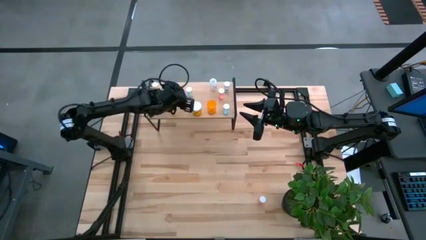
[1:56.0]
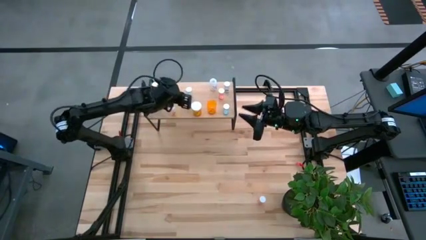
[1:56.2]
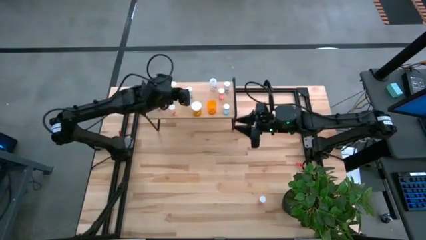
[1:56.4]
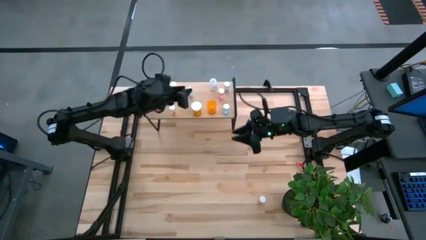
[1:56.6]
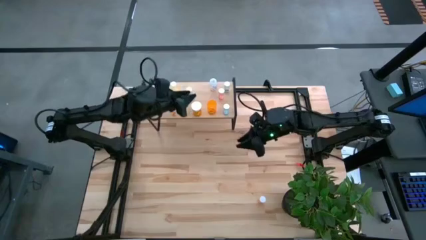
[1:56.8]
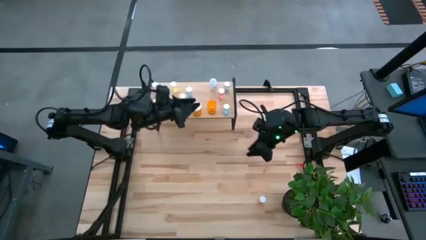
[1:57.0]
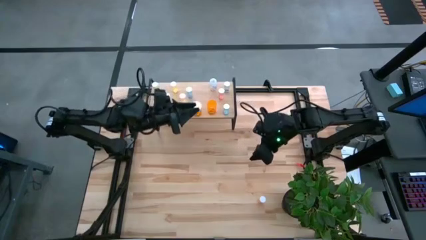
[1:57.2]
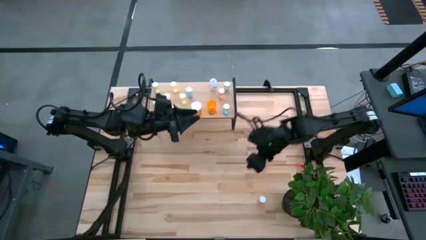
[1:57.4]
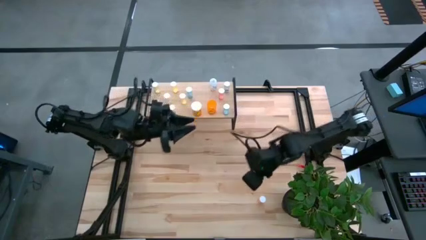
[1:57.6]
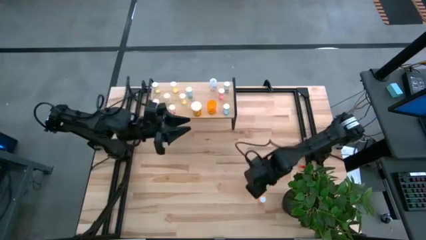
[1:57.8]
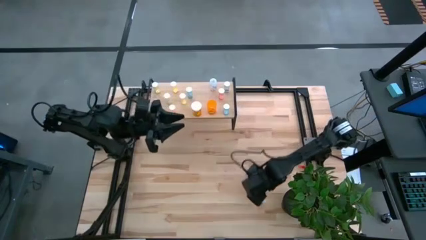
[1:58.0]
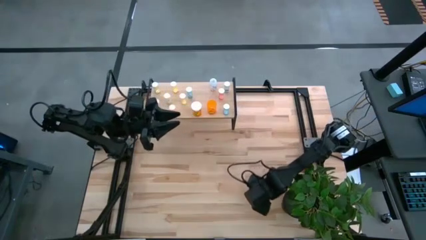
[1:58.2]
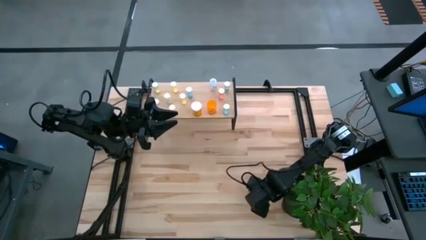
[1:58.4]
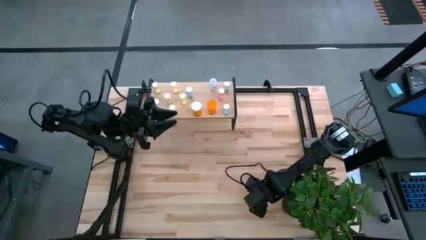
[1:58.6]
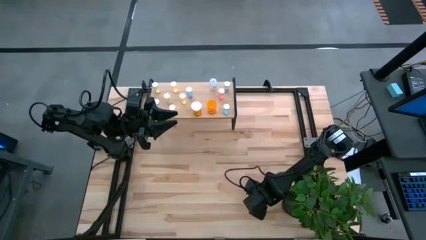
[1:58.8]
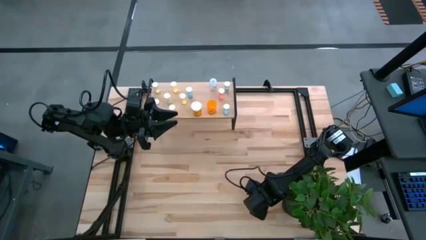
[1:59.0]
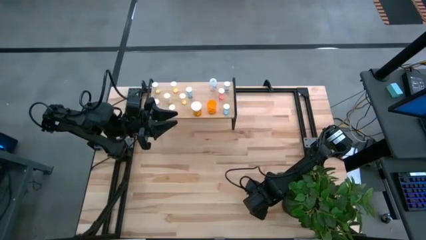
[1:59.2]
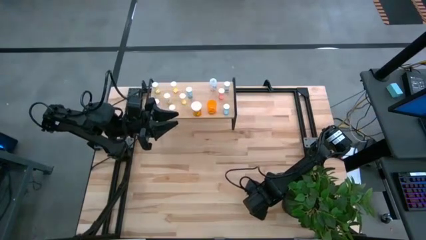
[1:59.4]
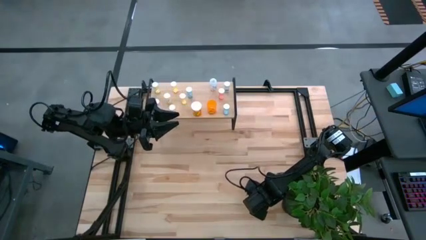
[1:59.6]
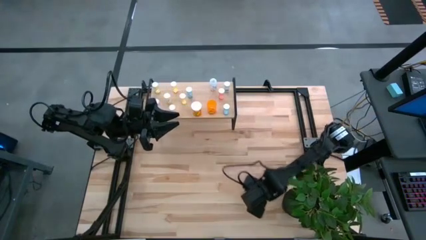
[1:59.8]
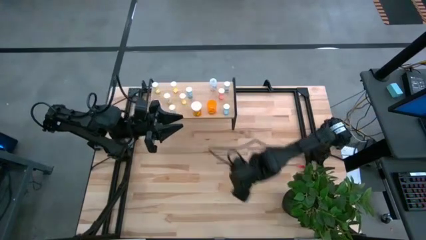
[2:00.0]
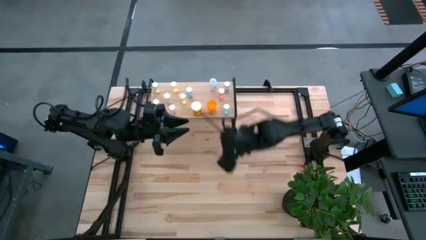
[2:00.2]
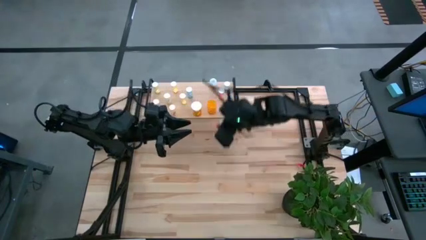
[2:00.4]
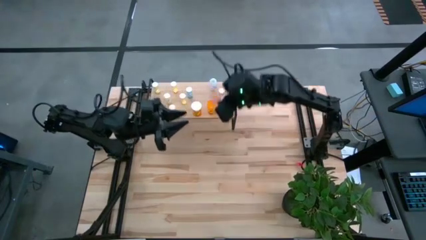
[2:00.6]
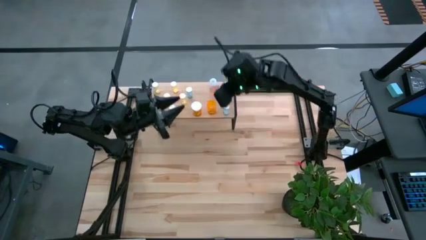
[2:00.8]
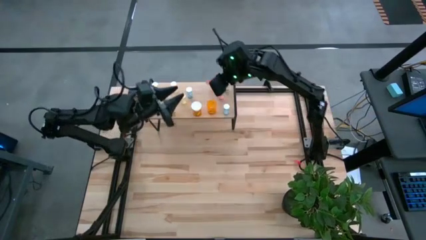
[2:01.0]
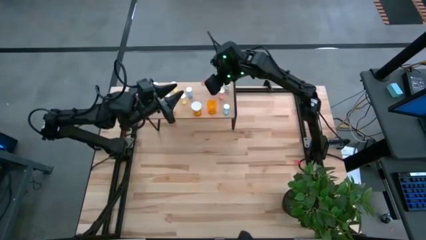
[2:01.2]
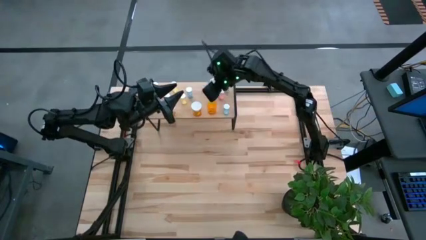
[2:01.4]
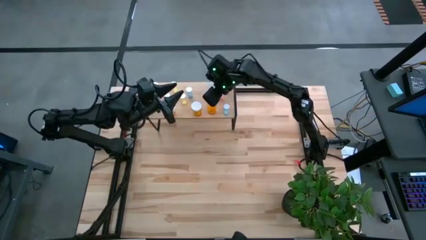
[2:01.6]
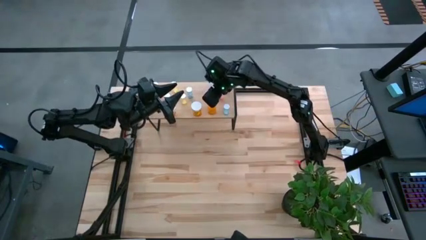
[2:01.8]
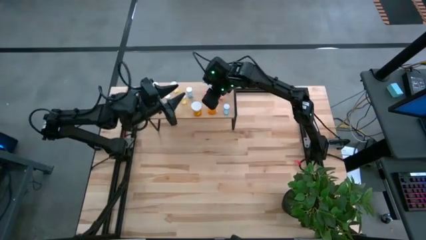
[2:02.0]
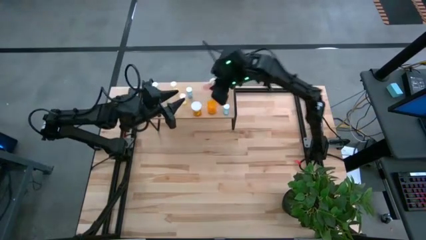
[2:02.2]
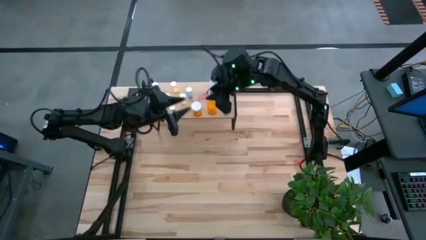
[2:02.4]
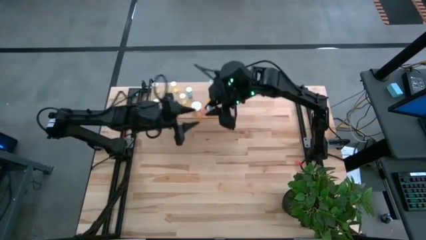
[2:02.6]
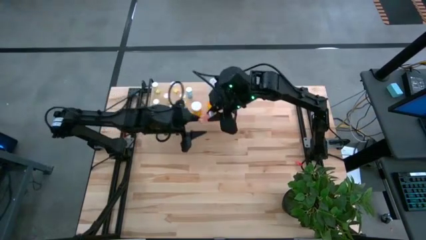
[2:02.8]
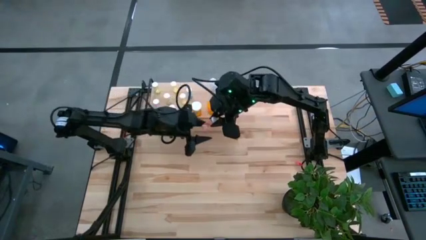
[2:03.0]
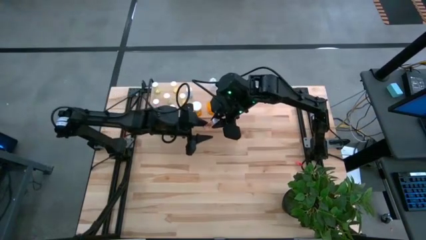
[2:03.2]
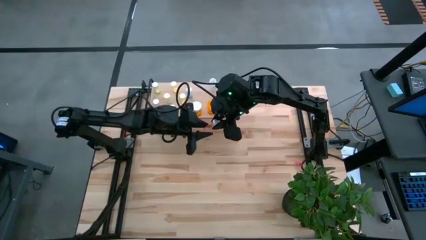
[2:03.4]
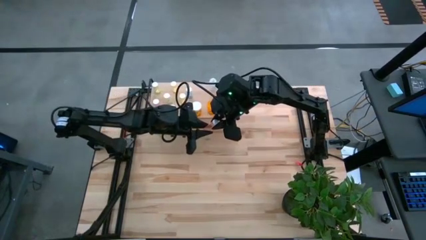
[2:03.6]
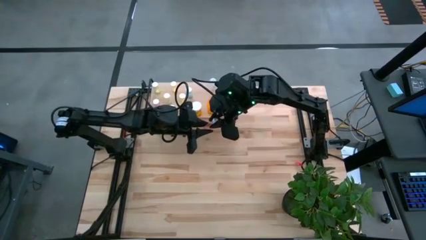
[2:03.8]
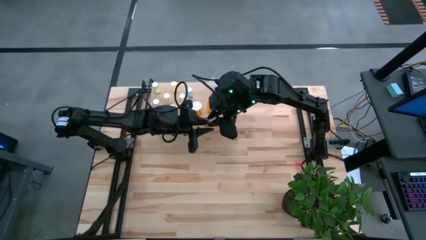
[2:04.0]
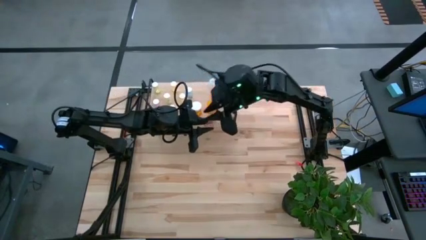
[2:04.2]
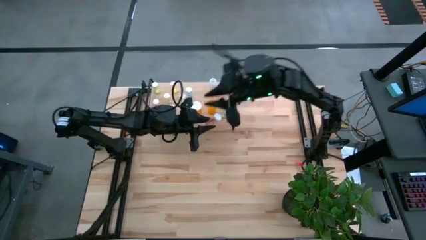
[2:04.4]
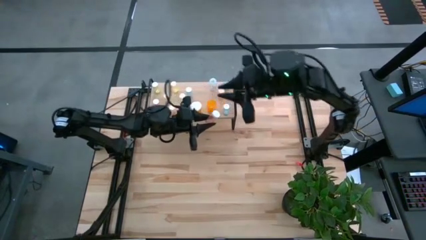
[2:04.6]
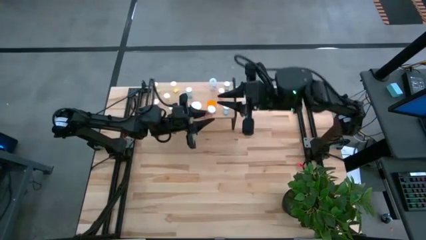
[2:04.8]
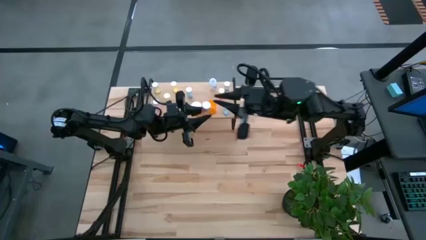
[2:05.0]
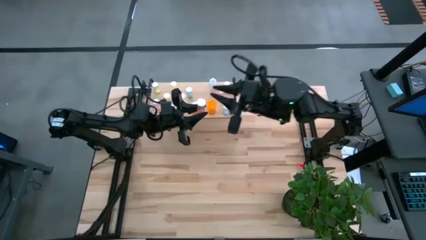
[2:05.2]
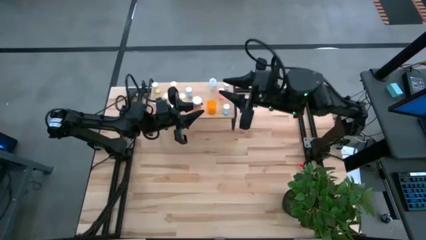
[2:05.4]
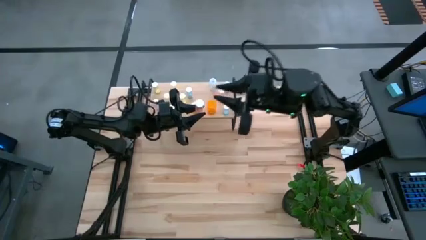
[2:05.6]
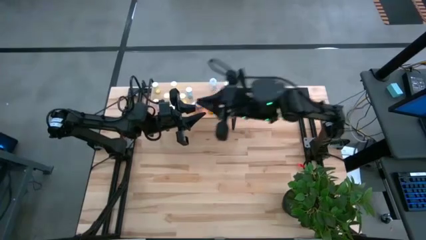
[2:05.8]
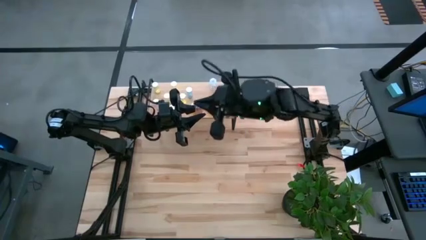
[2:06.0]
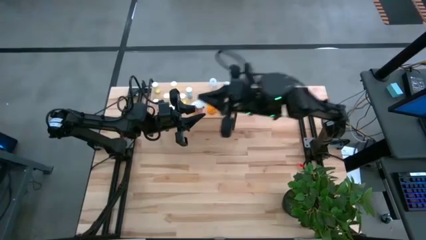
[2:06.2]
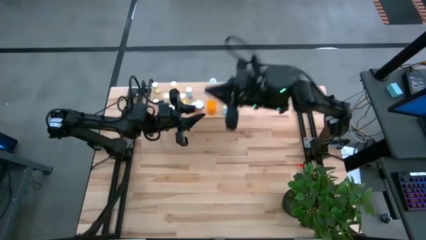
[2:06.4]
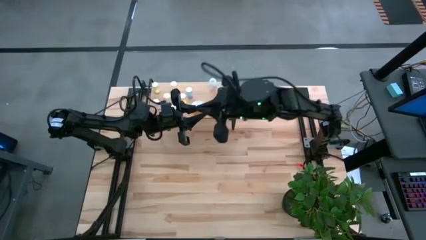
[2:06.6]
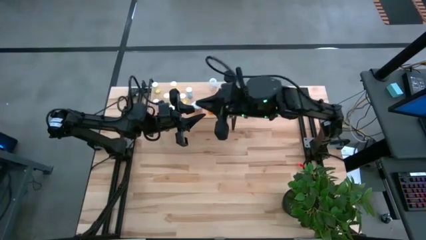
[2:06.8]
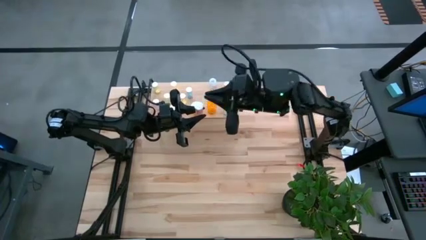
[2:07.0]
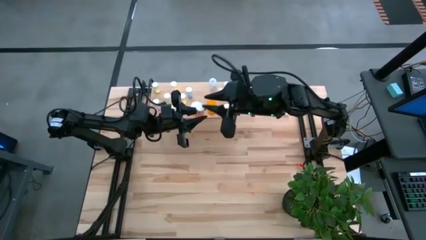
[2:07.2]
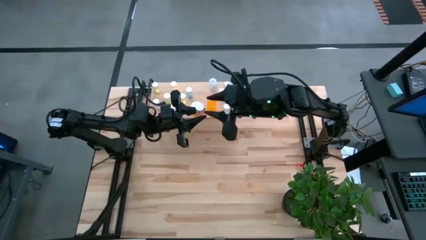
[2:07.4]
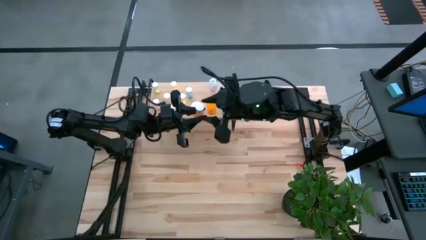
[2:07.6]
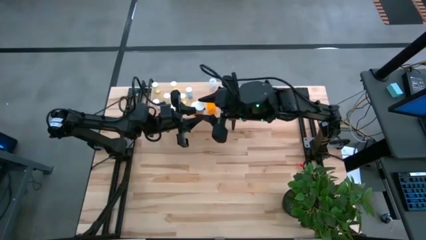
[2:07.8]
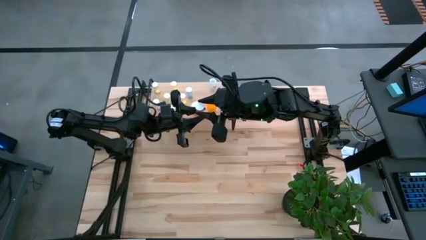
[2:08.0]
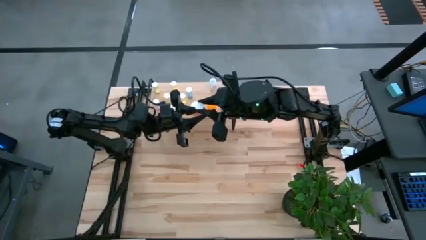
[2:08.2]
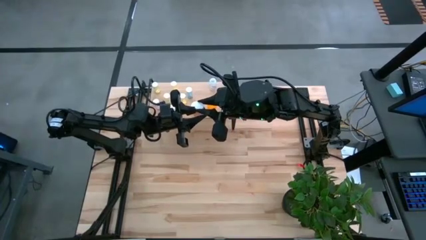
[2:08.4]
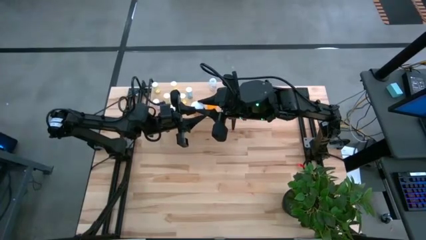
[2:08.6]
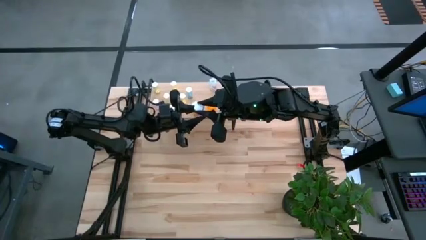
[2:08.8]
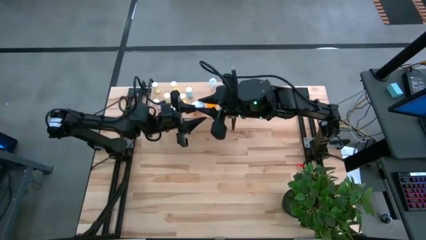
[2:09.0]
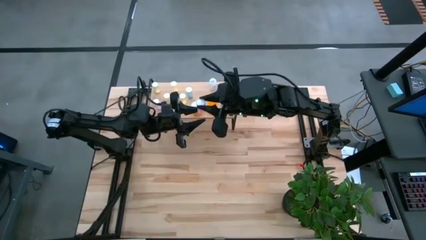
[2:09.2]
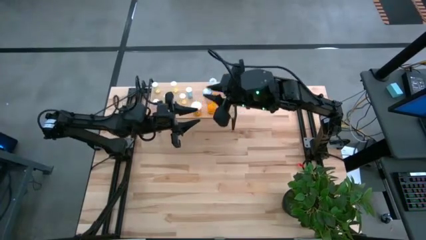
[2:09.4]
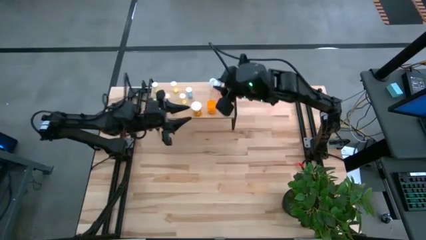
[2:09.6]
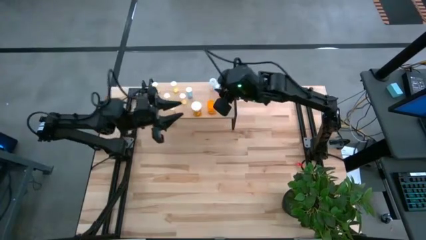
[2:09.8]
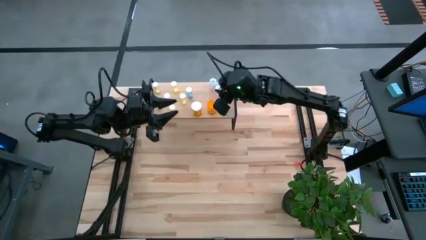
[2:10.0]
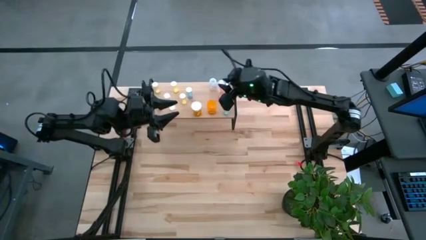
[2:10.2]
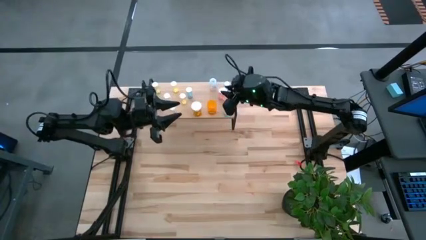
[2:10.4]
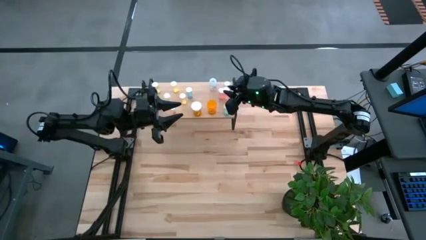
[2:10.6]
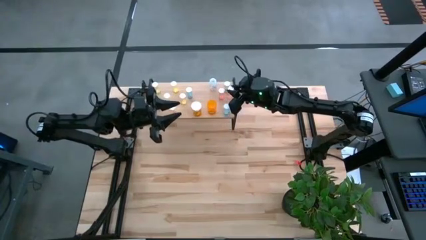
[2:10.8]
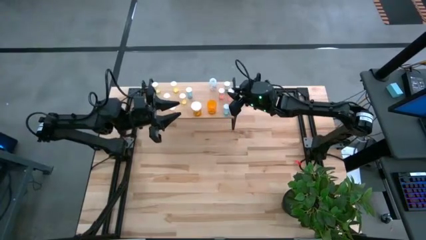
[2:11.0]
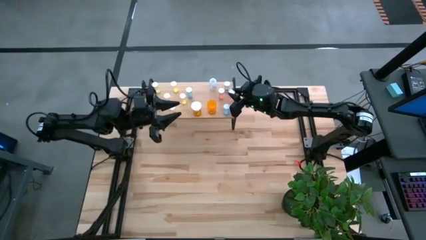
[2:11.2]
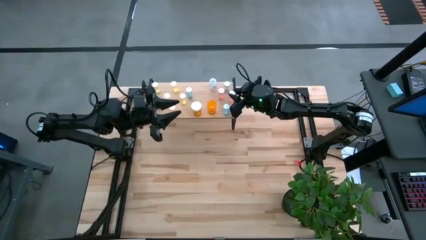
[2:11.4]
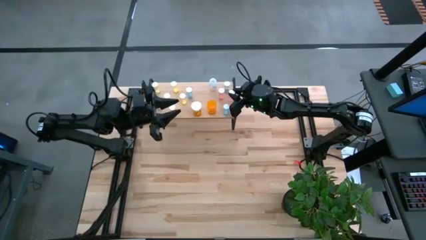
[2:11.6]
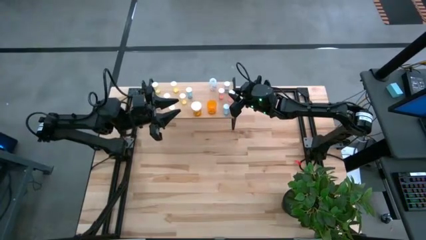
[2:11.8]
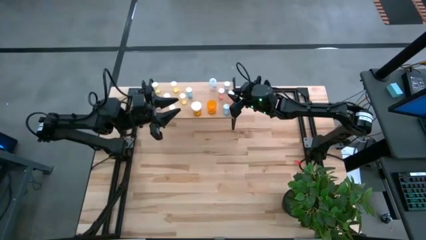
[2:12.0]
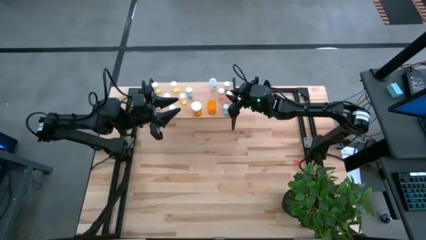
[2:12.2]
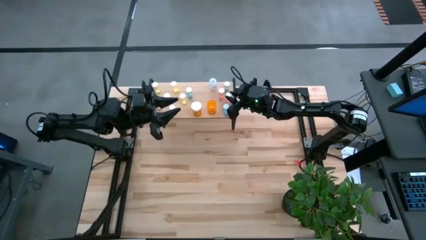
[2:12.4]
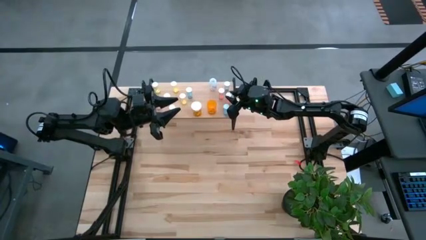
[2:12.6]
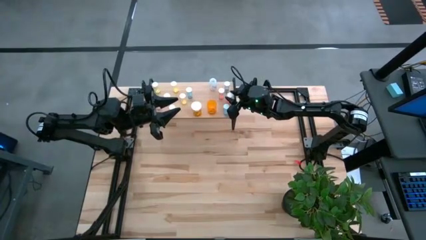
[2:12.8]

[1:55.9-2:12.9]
Task: Pick and place medicine bottles onto shelf by color
Put the red pill bottle on the shelf
